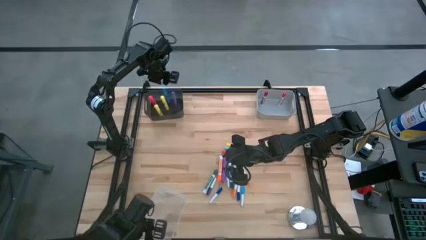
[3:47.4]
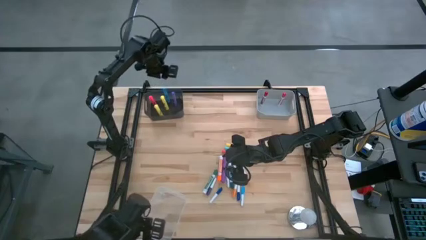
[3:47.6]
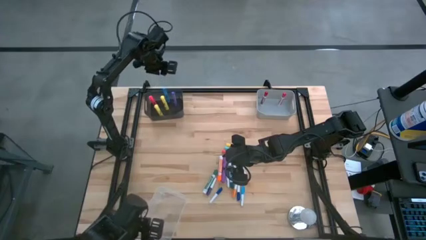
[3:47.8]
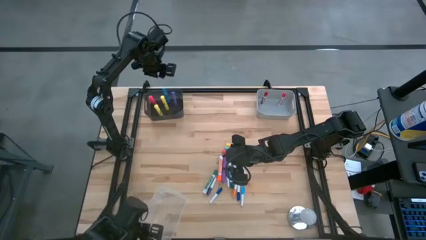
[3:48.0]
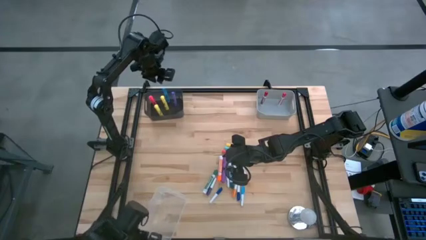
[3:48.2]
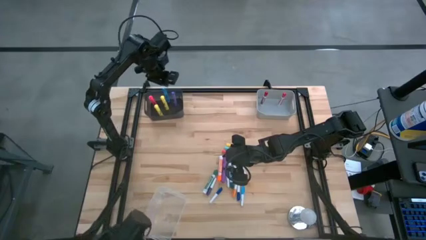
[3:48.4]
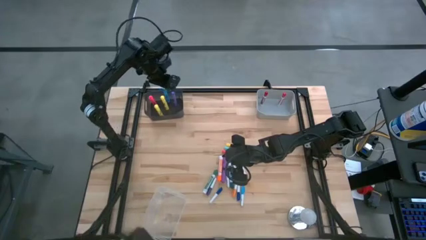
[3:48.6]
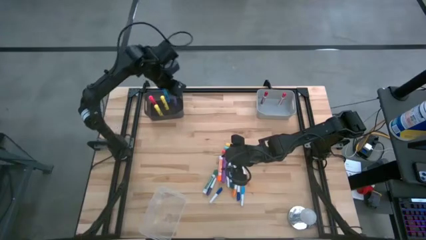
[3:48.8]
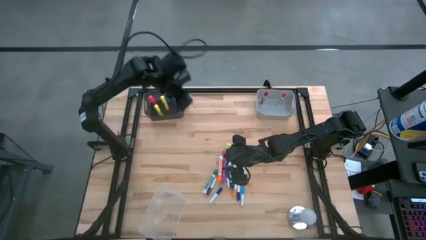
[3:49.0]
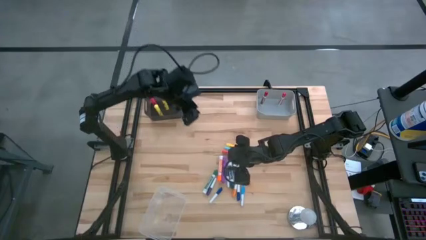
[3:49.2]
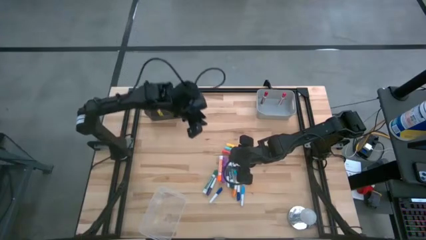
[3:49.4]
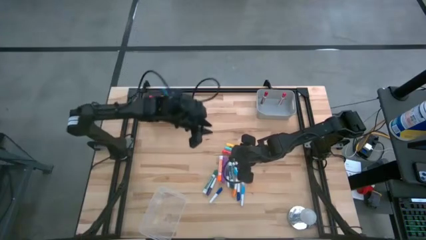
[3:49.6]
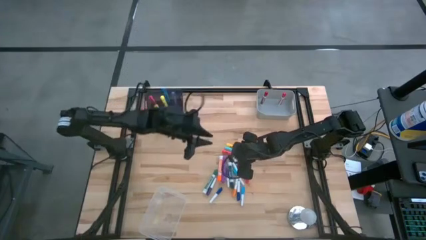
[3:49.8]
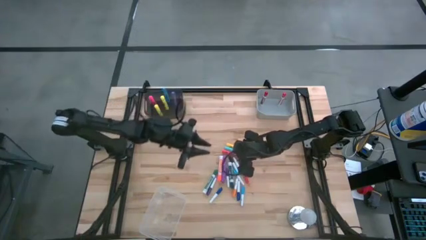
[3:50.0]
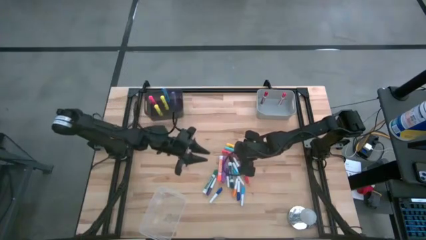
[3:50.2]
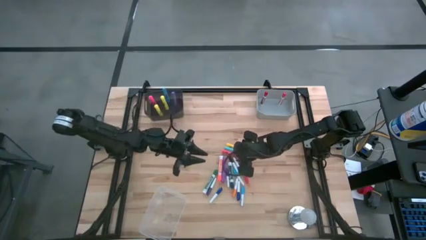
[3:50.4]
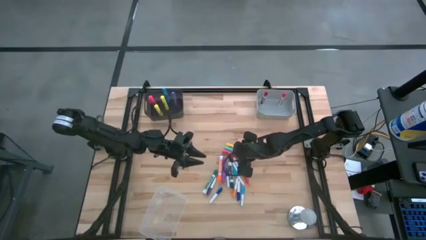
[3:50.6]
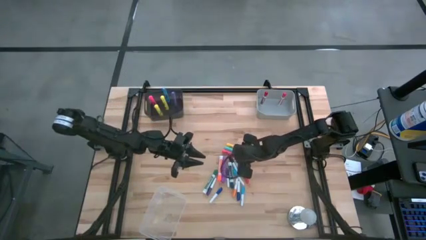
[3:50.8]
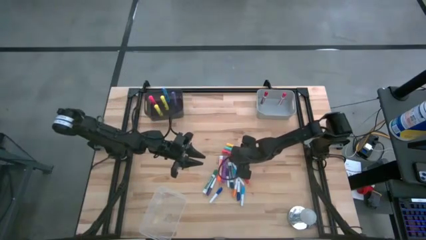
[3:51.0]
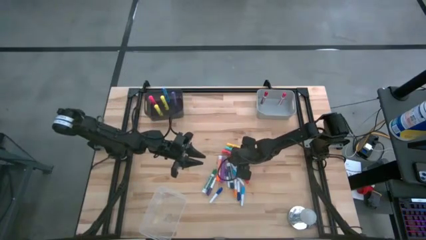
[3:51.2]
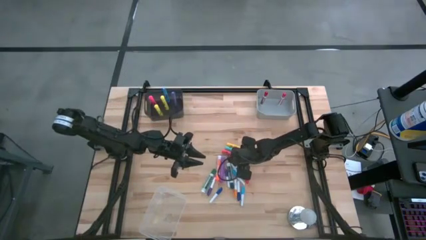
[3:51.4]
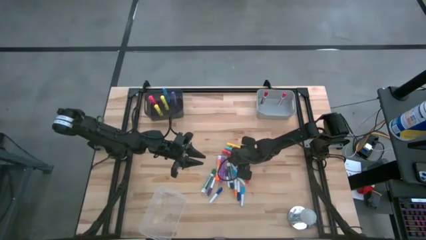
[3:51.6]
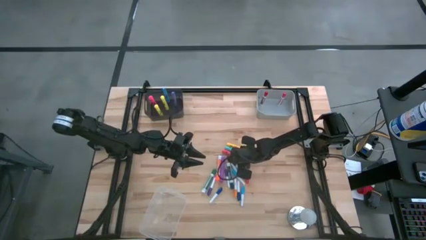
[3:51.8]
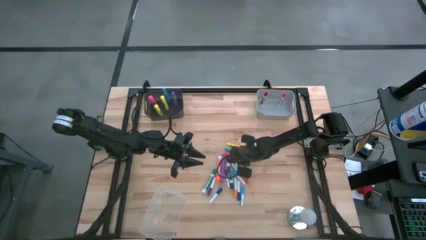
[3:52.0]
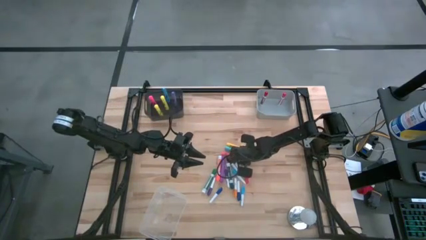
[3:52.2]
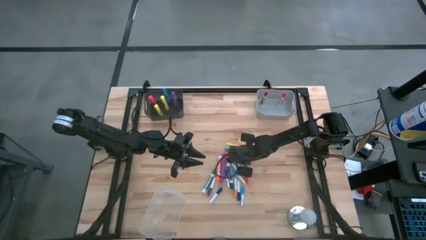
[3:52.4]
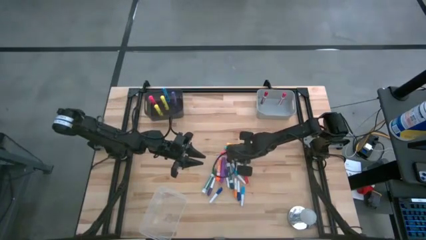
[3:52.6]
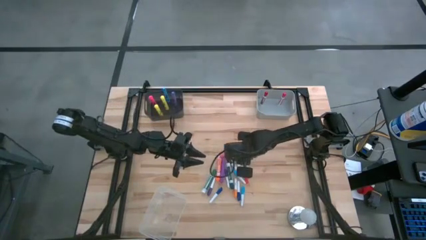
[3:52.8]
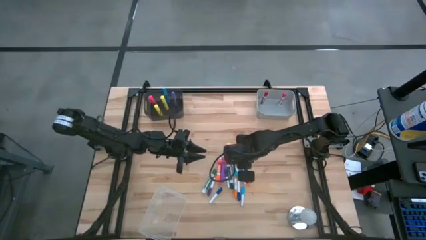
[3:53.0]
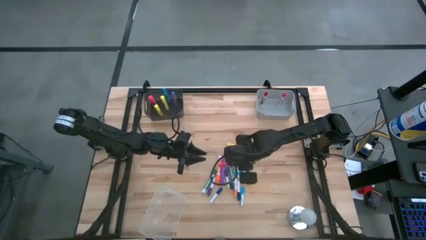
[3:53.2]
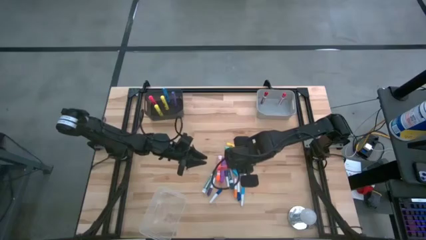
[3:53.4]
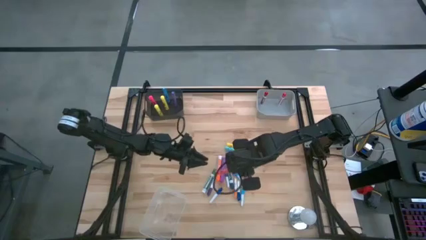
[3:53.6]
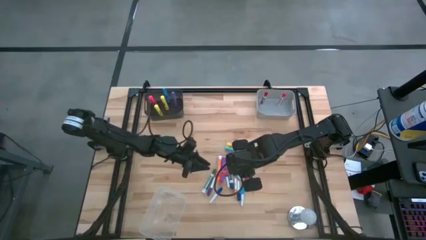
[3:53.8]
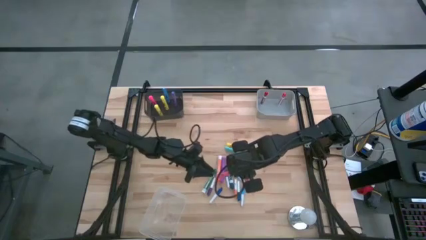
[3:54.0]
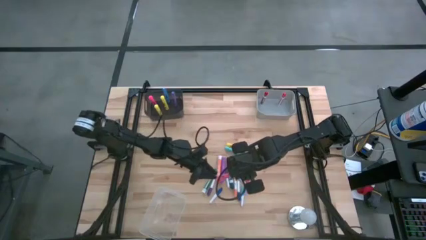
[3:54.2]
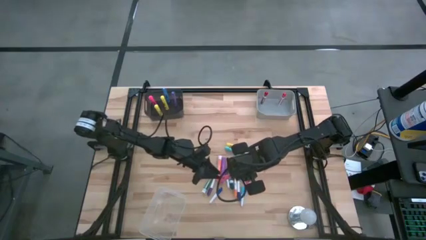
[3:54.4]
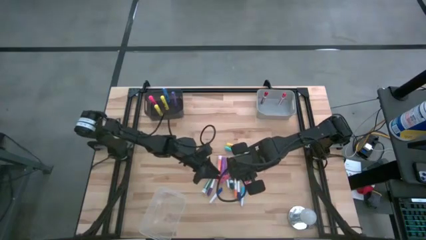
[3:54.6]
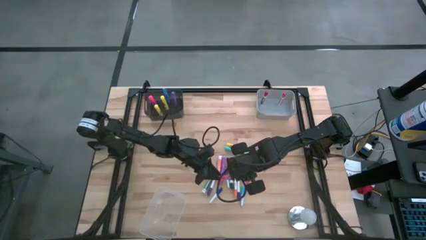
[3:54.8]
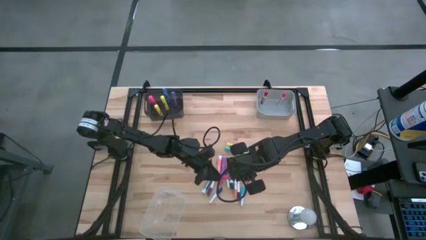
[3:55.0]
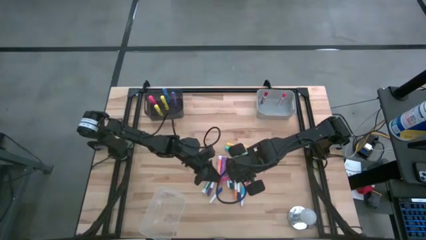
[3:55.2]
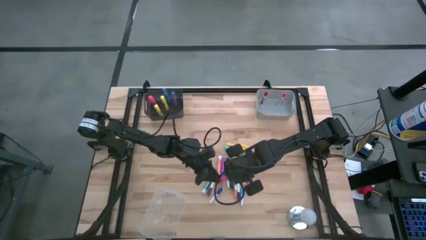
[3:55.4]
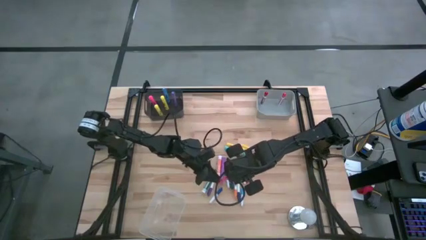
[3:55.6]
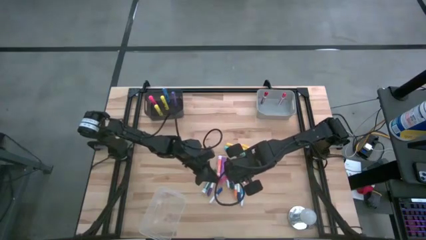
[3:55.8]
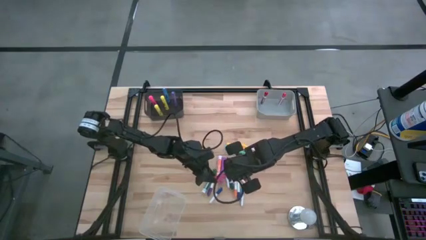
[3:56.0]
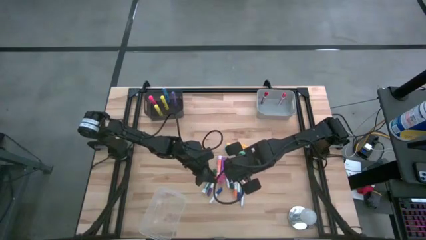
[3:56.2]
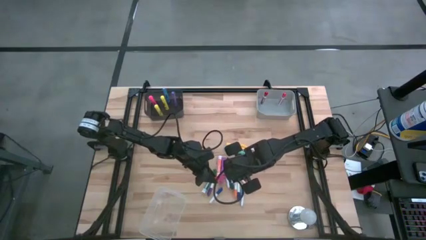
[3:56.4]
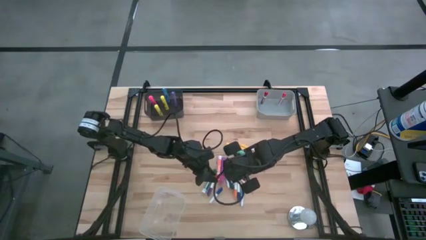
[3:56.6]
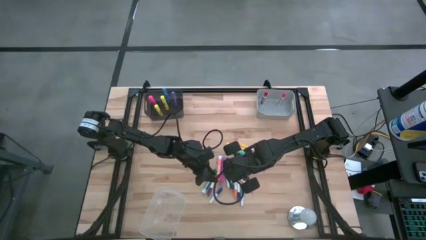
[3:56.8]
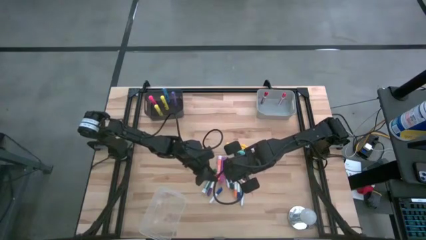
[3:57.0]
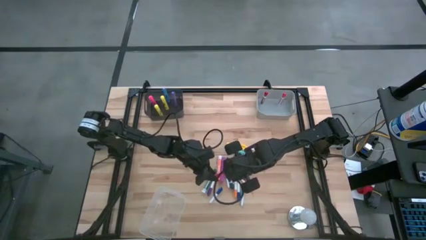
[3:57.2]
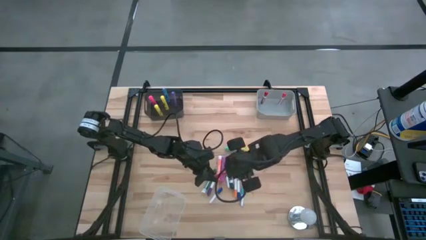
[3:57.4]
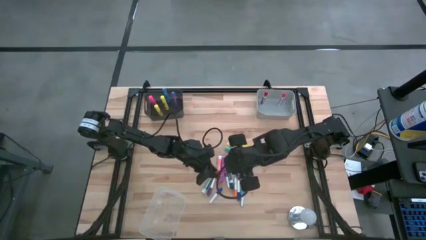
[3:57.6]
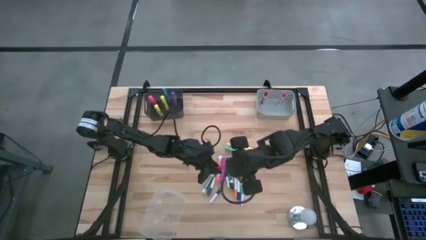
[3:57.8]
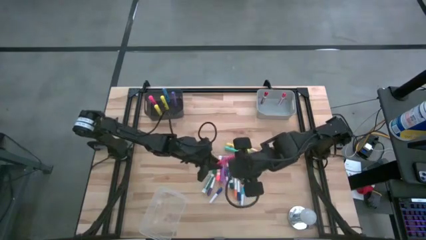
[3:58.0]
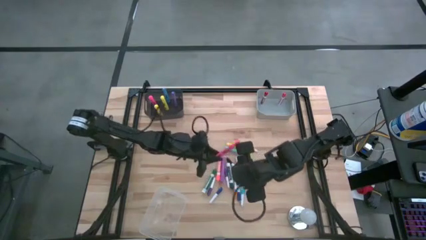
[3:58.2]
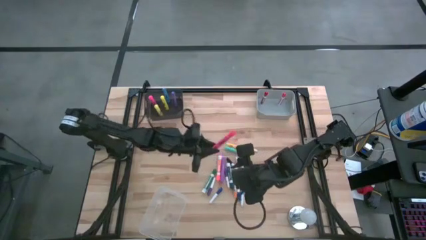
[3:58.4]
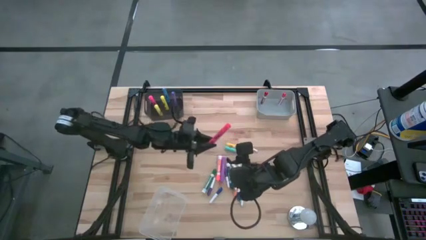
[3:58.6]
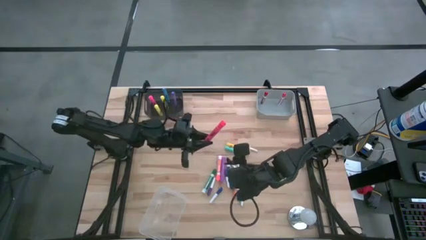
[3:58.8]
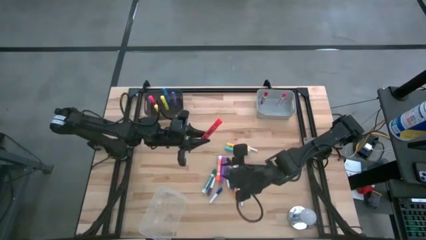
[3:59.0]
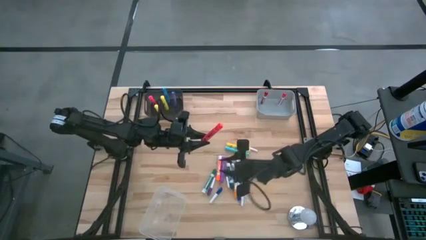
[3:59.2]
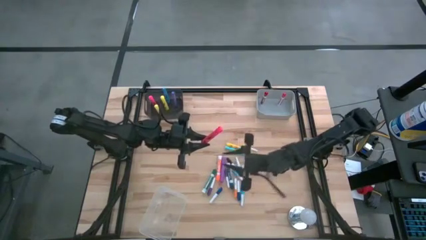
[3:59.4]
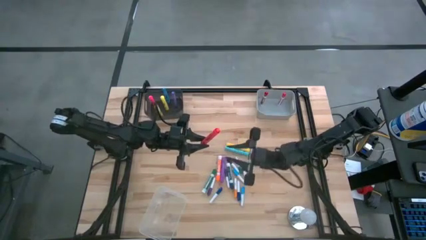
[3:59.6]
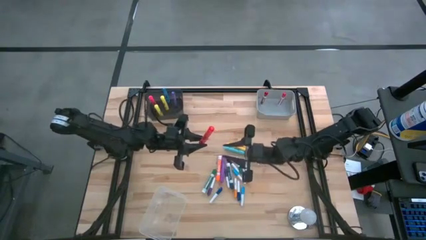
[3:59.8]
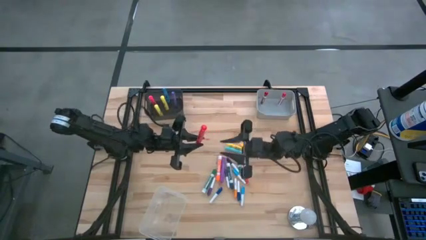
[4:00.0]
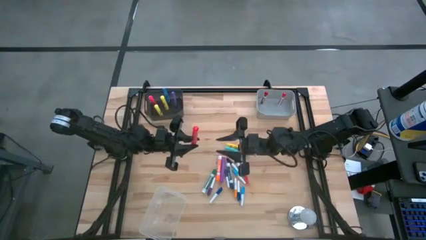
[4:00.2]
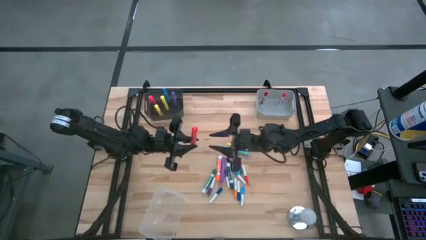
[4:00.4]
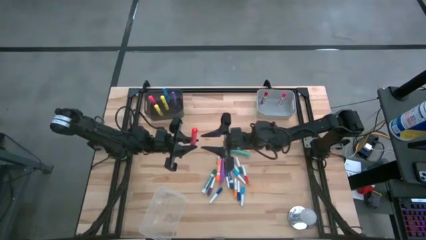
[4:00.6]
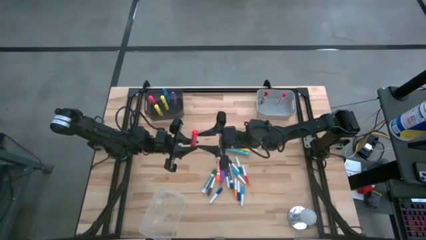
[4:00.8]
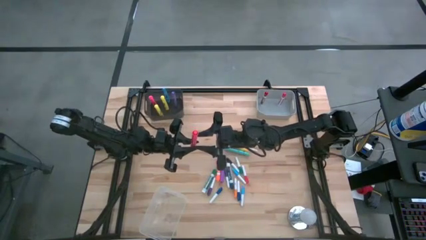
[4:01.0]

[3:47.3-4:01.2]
Task: Pick & Place Markers
Put the red highlighter pen into the black bin

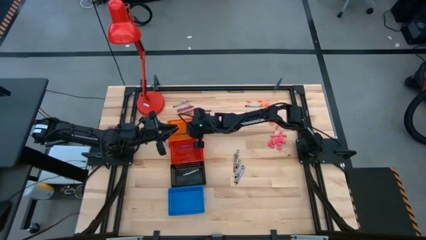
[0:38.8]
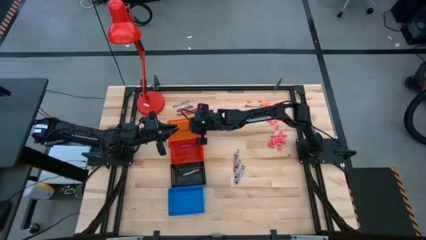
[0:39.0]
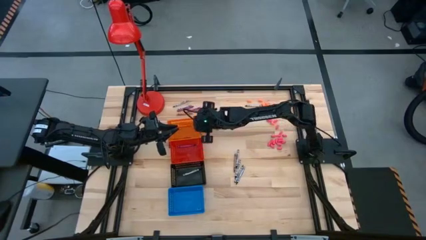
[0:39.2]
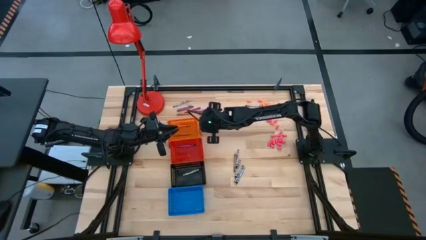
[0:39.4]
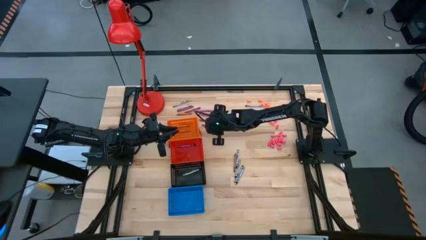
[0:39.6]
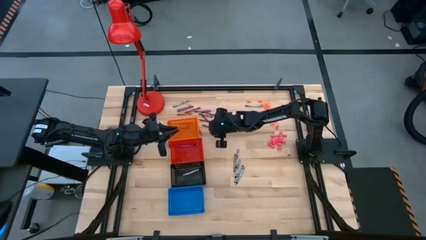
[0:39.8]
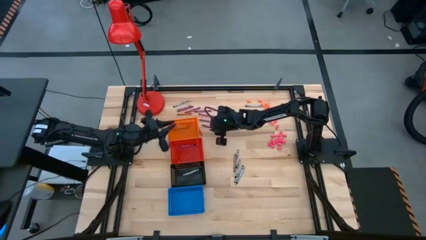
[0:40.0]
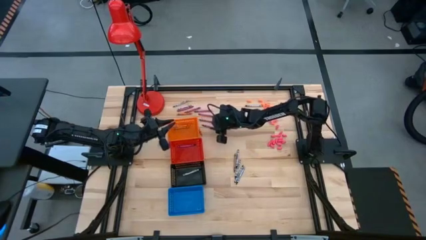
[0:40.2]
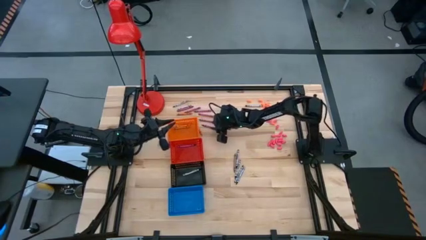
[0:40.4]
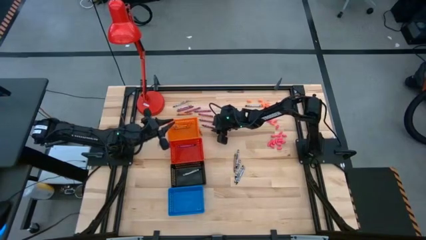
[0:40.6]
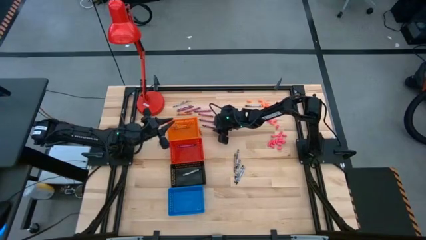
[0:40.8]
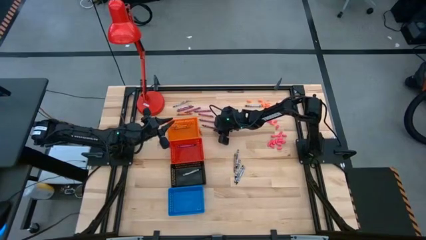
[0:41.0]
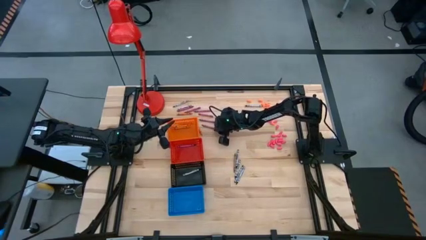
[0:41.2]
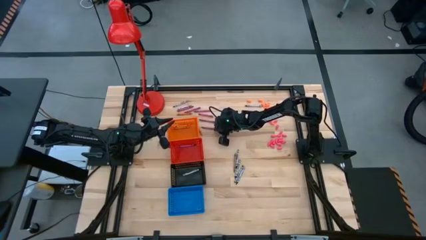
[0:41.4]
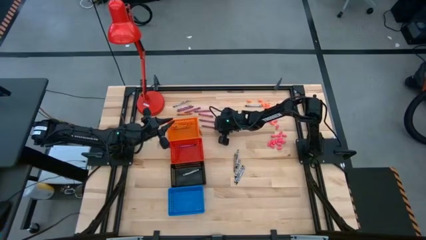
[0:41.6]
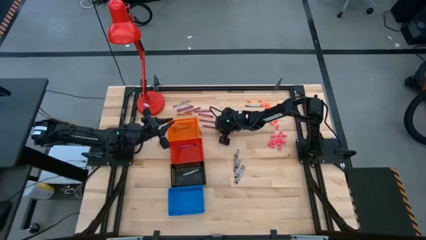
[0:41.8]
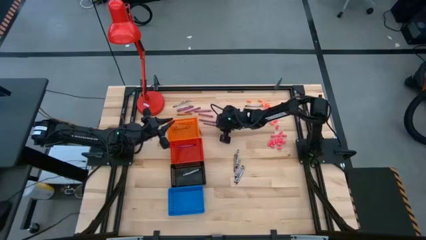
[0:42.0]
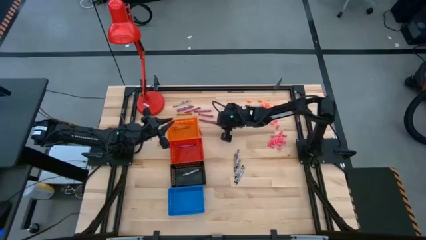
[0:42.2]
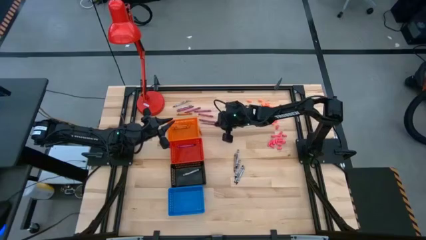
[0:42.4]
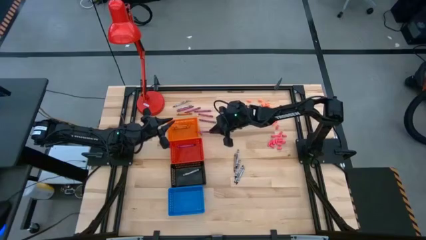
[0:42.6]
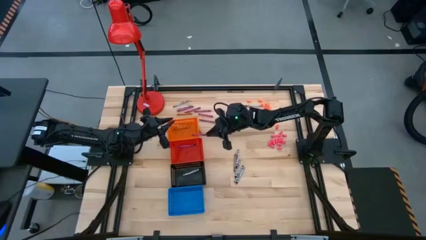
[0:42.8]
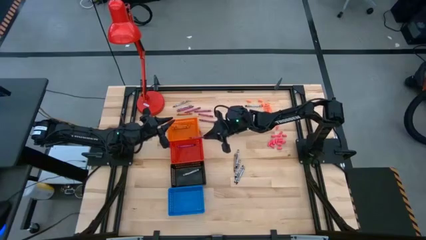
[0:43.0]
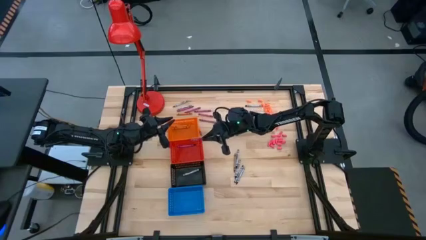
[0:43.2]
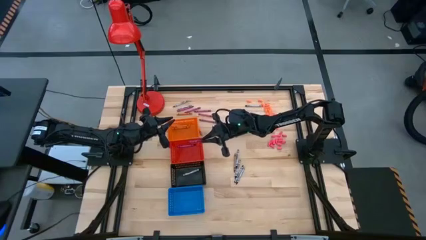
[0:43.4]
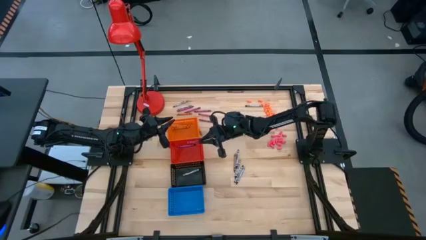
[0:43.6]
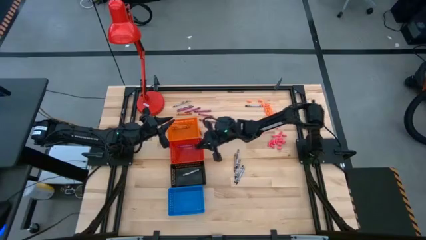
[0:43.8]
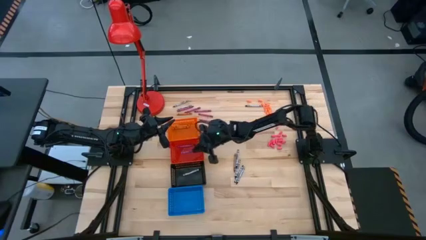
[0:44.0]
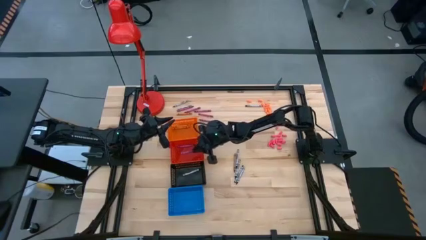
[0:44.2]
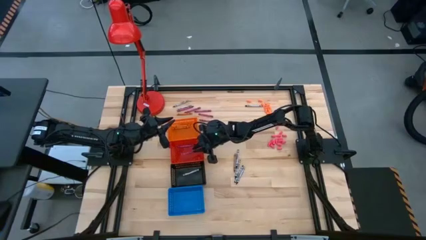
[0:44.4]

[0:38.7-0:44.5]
Task: Sort crayons
Put the red crayon into the red basket
